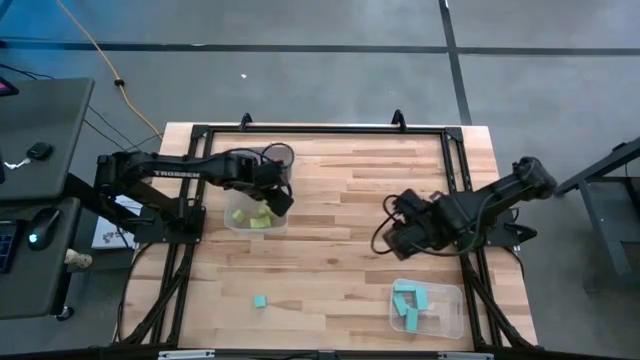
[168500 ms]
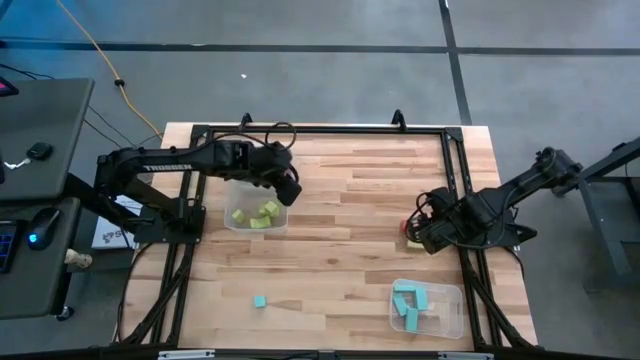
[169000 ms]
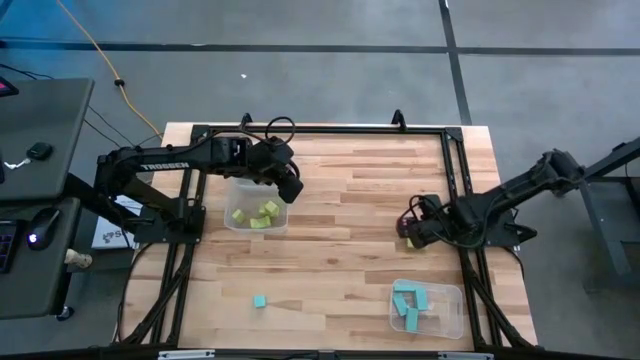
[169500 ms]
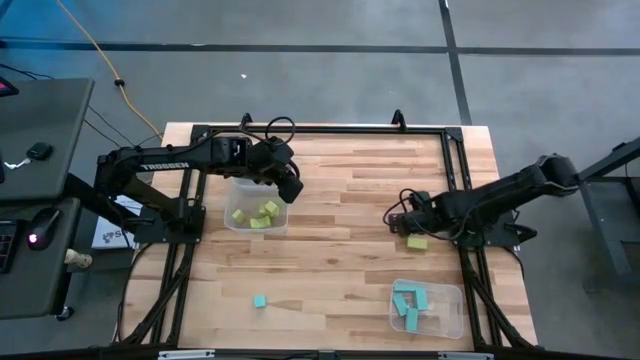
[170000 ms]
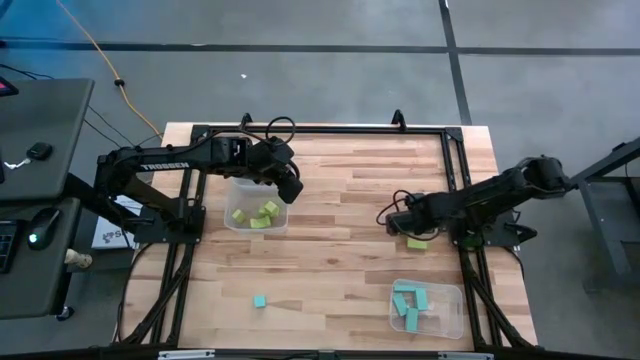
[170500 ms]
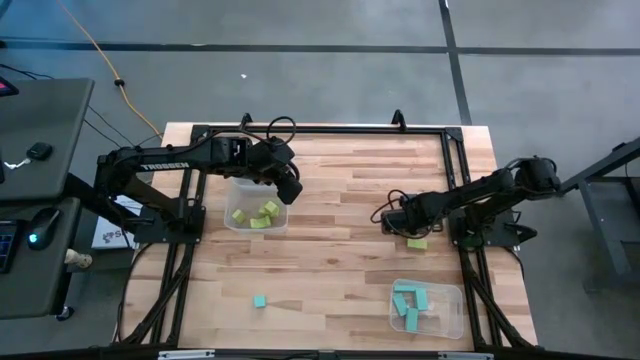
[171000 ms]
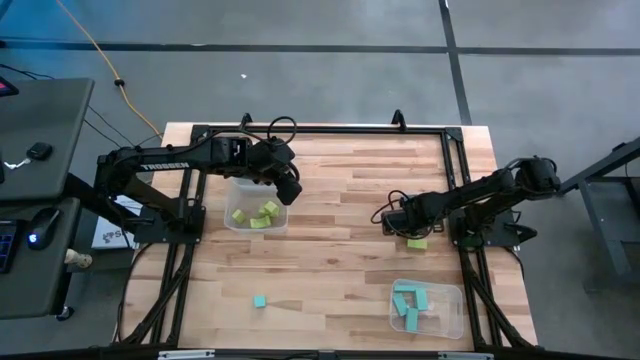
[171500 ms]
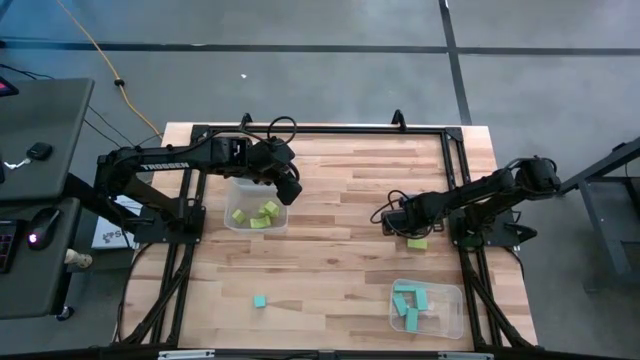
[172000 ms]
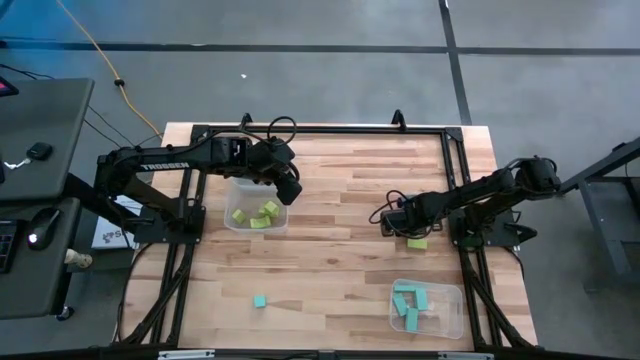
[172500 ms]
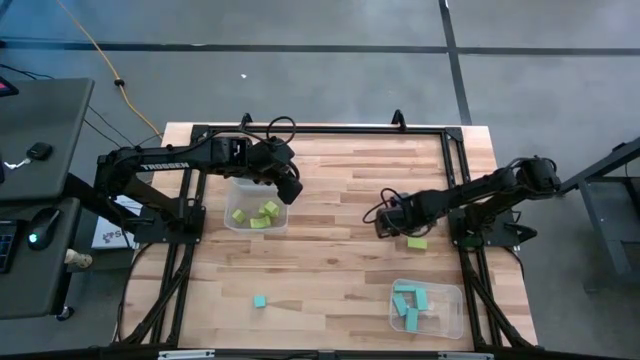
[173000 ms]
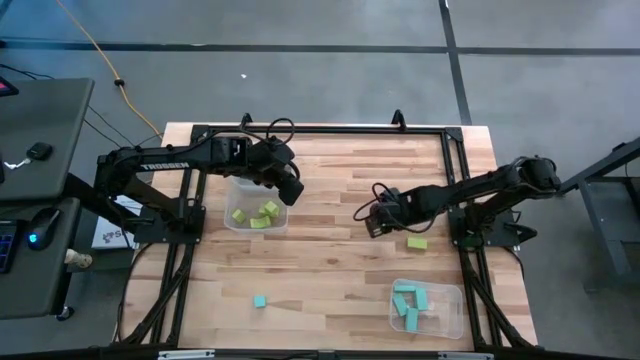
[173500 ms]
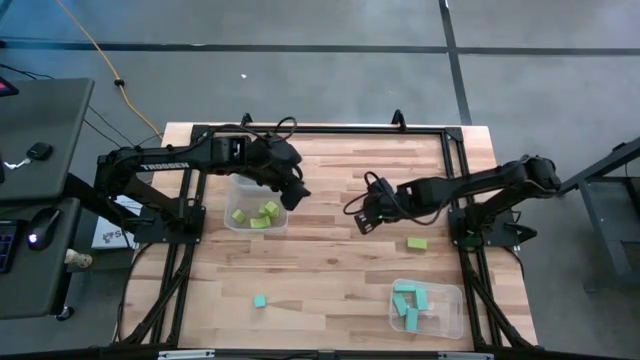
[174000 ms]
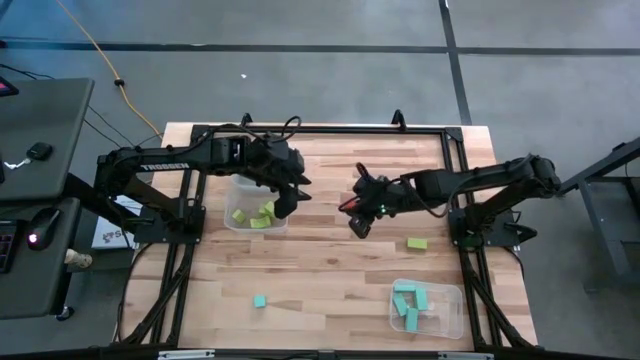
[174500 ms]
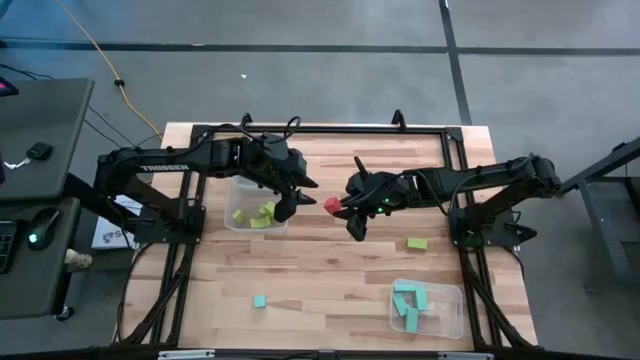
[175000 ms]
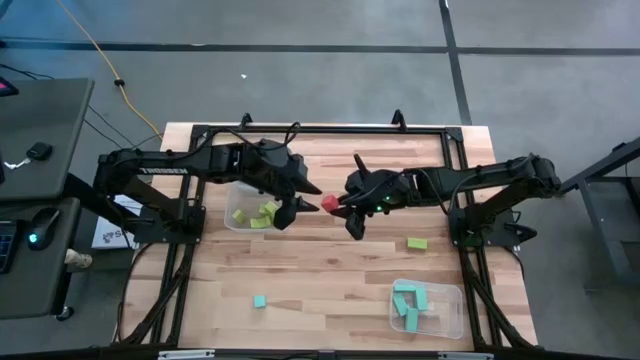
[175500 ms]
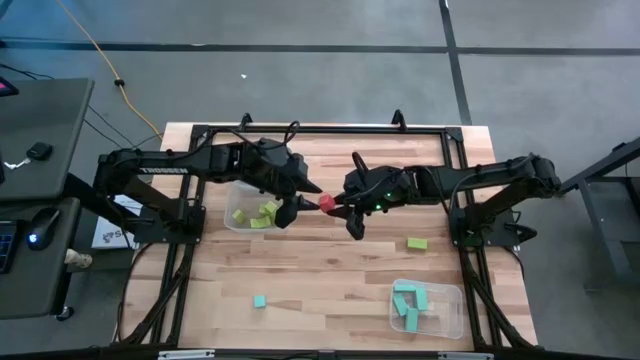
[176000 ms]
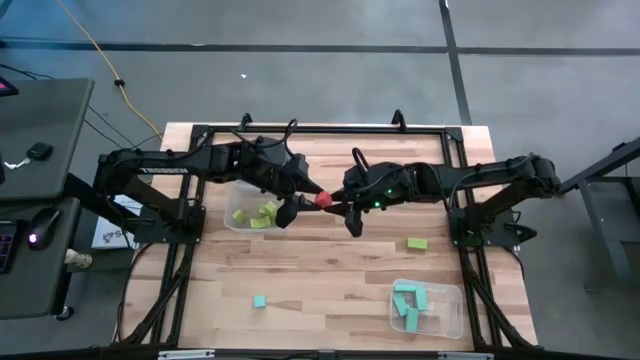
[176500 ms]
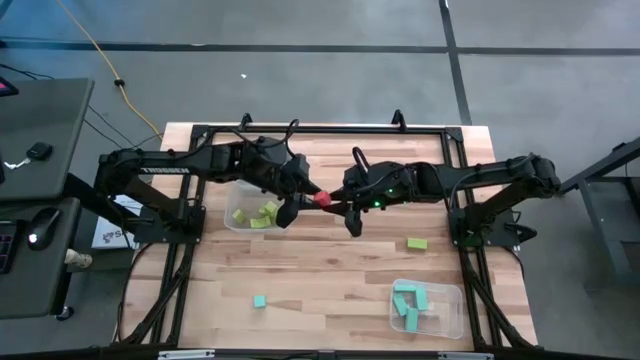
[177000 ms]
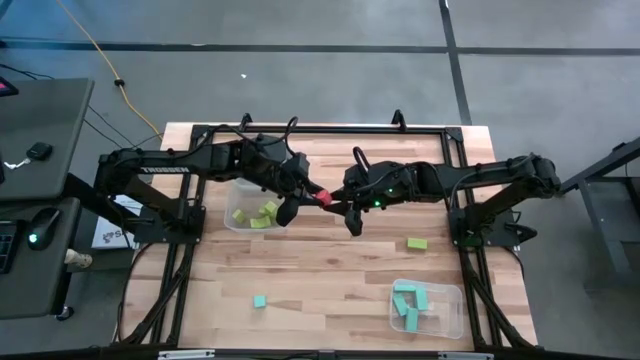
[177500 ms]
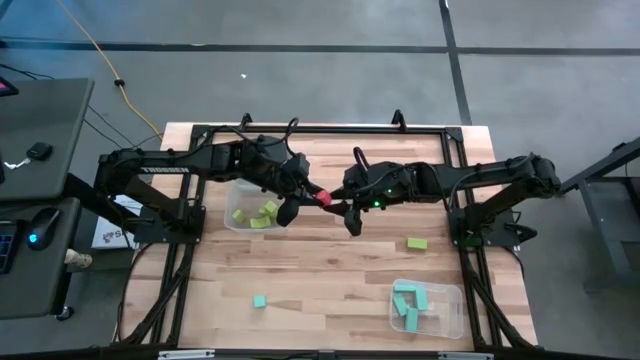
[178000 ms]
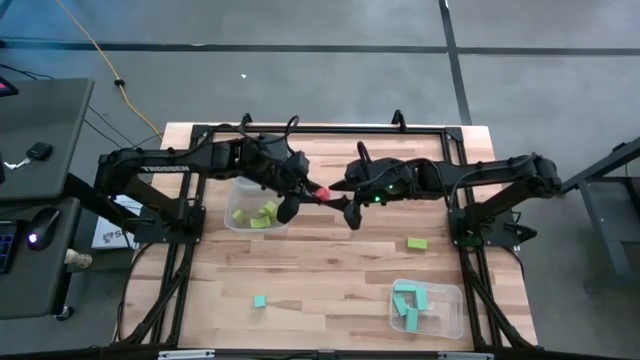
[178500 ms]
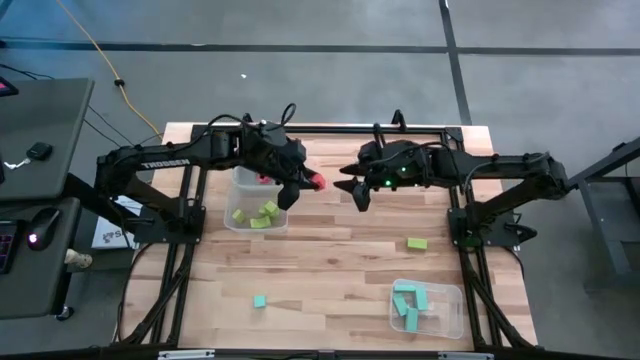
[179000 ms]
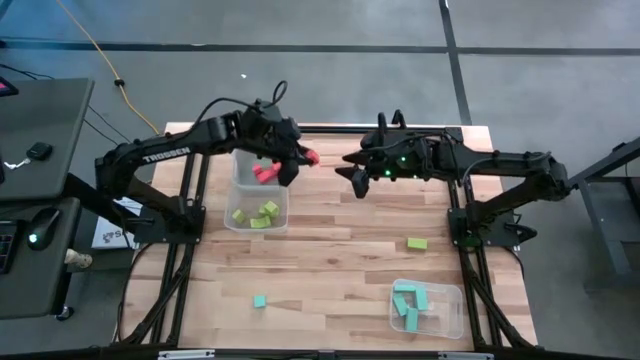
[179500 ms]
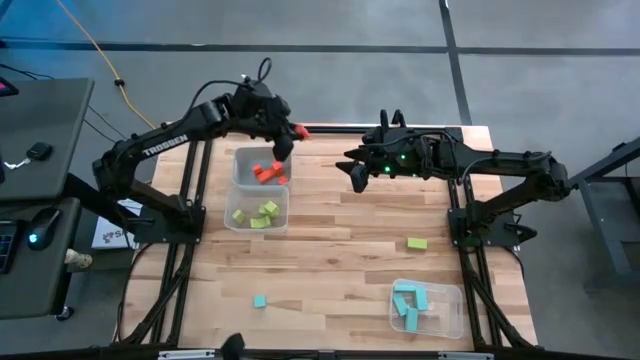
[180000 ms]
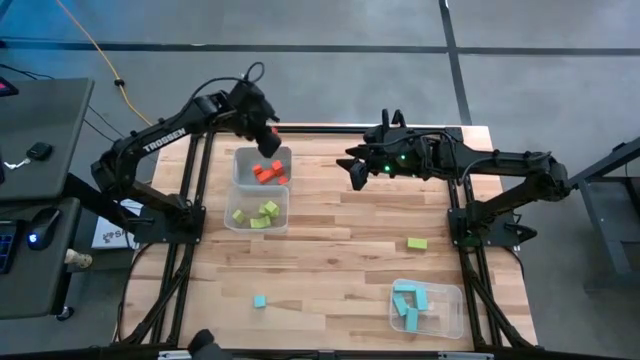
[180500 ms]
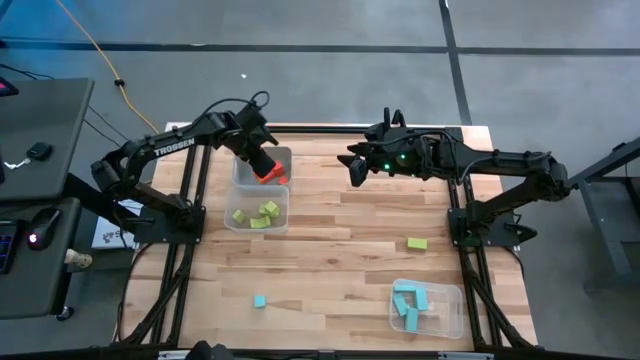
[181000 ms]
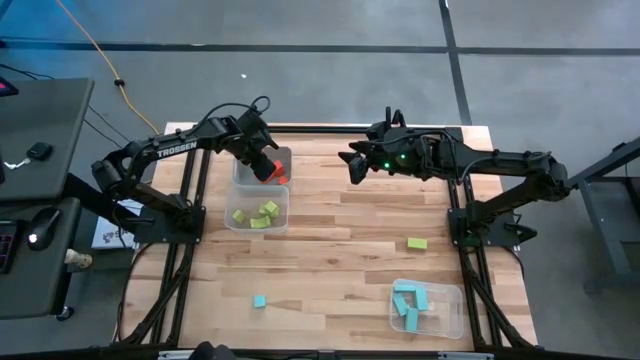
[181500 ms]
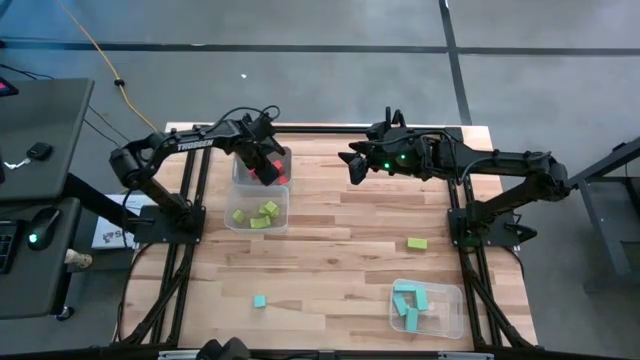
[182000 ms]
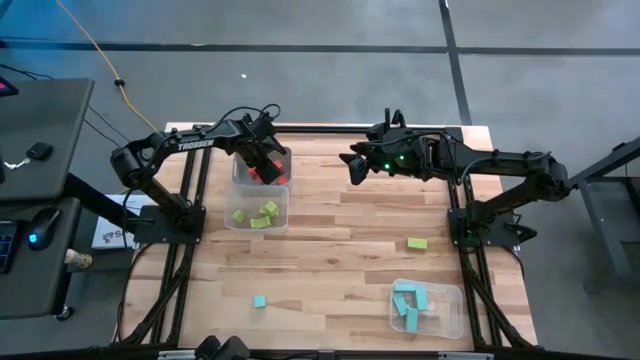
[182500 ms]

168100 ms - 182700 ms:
Task: Sort & place blocks by color
Put the orange block into the gray bin

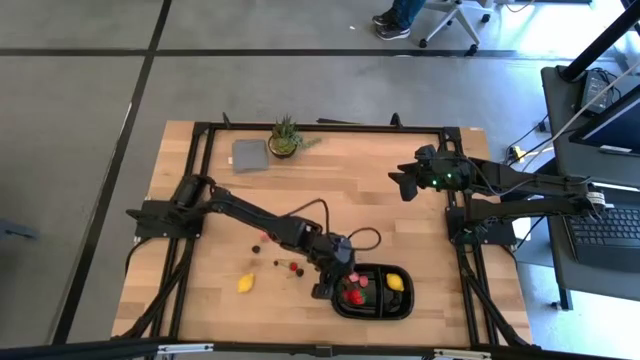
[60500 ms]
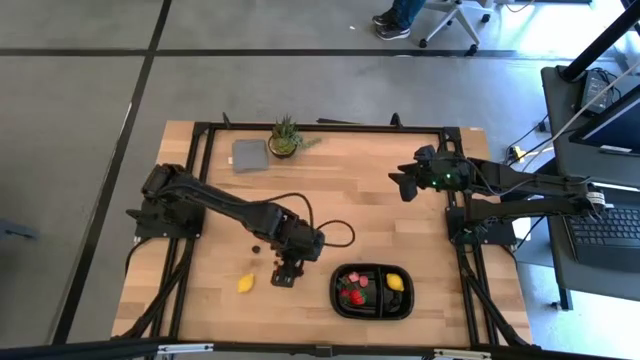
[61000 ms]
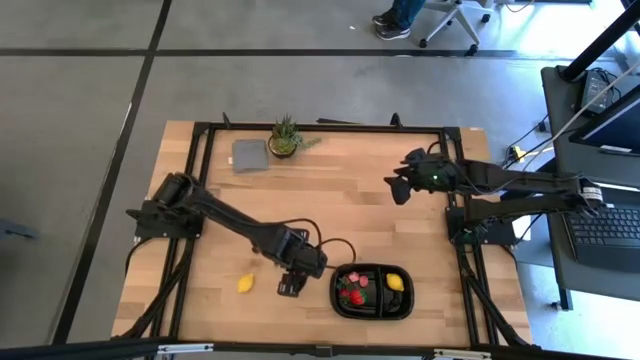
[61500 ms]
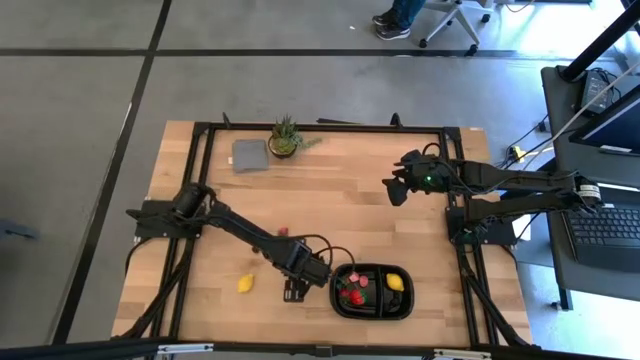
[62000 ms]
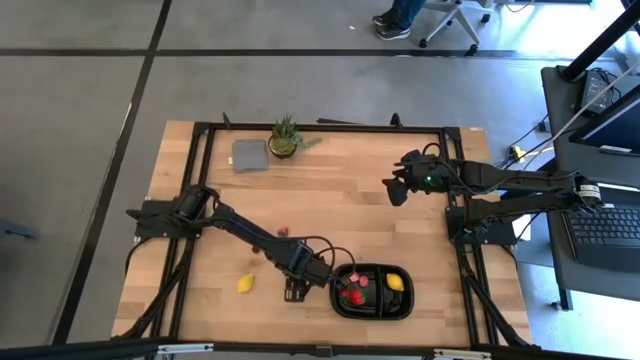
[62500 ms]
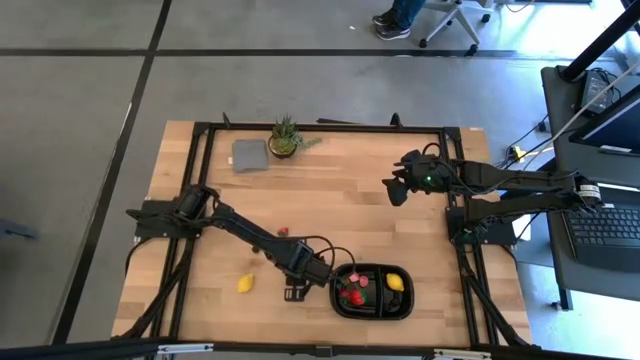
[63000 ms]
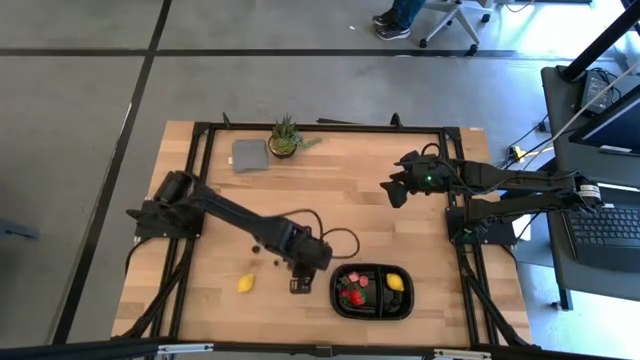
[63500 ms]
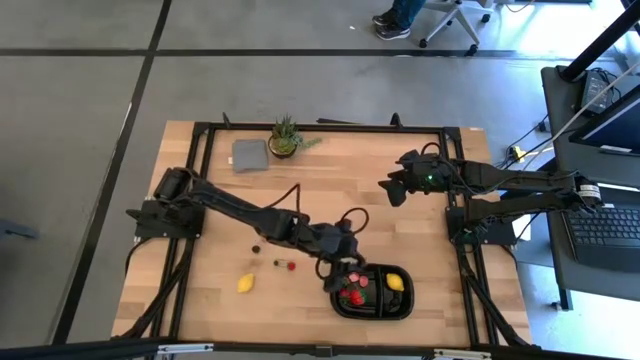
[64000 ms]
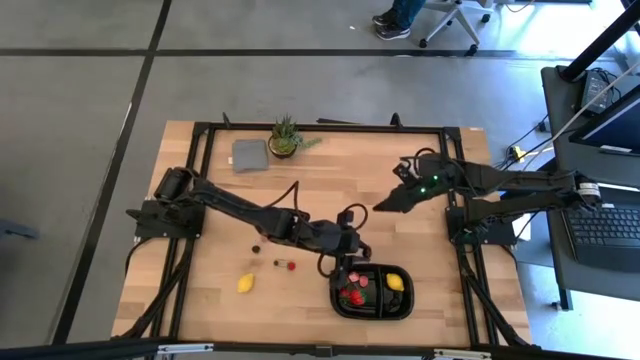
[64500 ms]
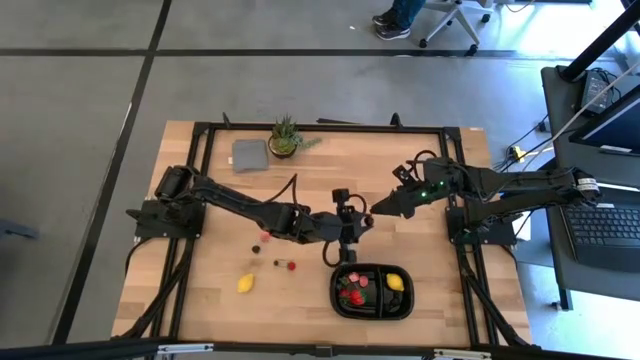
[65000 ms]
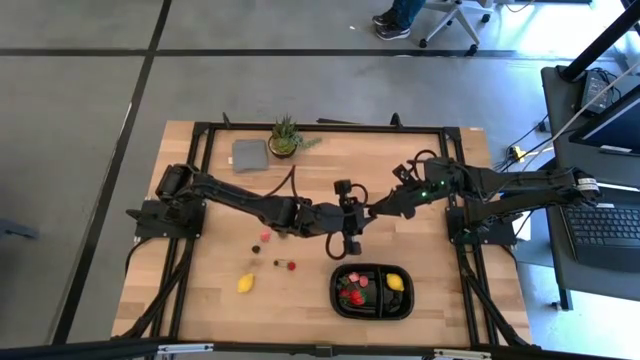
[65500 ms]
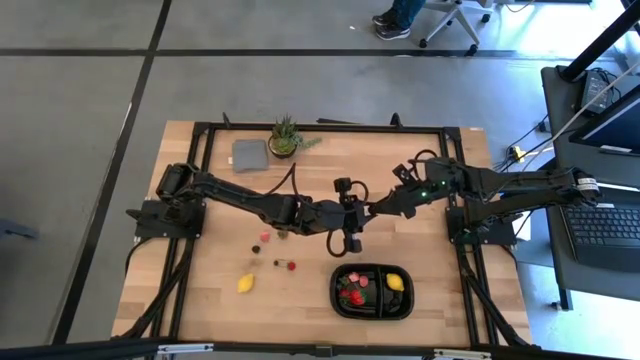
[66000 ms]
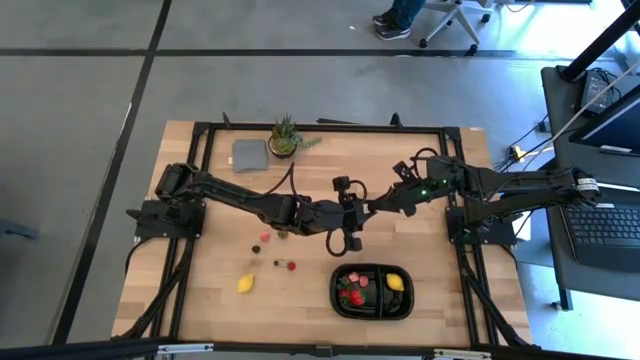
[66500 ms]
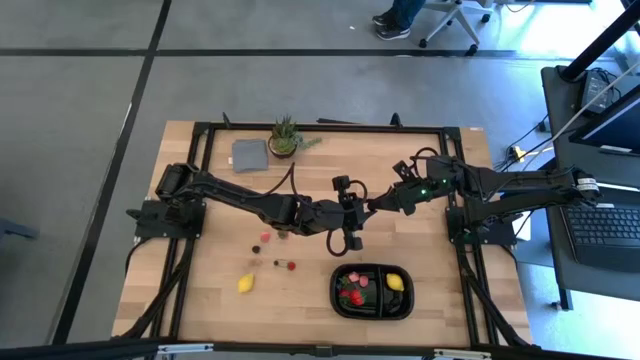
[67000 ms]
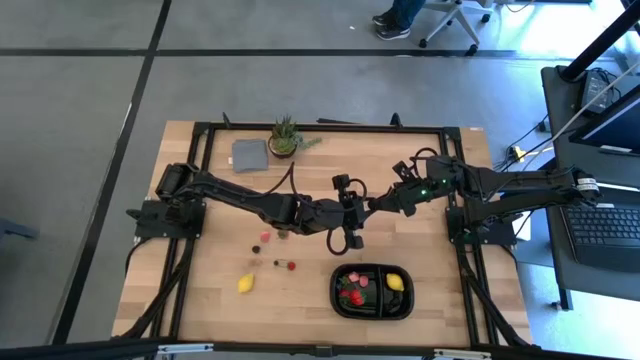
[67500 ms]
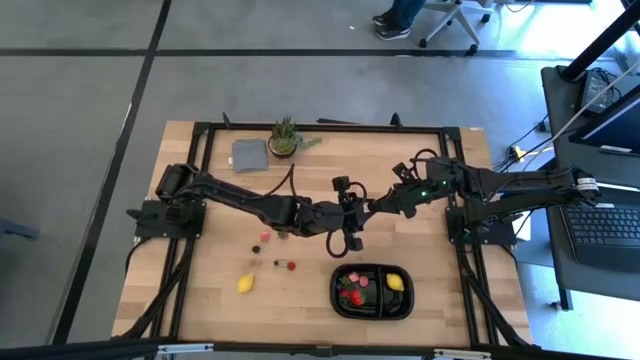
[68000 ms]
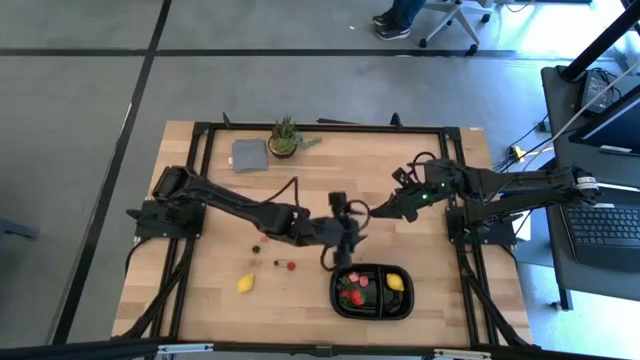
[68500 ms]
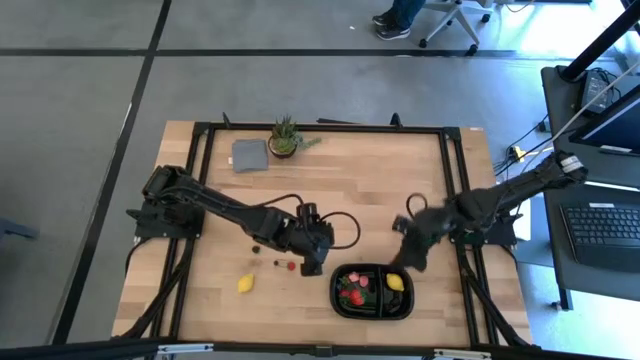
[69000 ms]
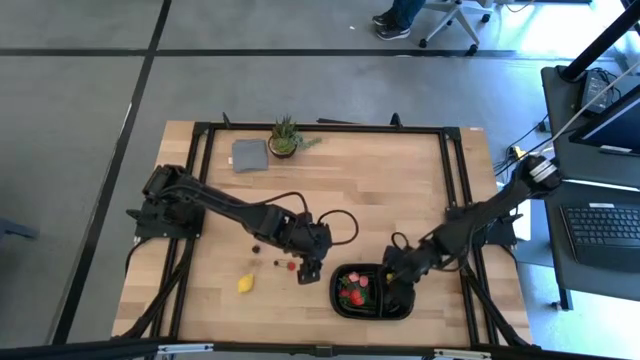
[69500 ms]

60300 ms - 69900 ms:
Task: Pick and placing Produce into tupperware
Put the black cherry into the black bin
